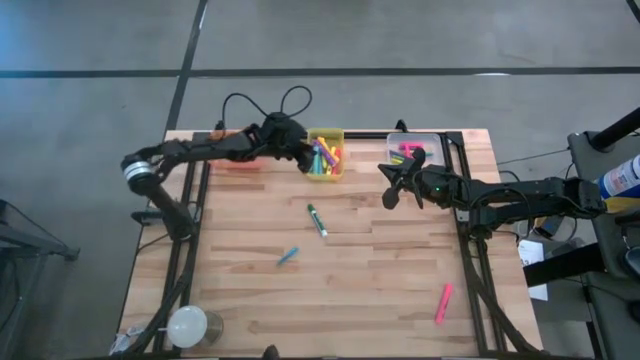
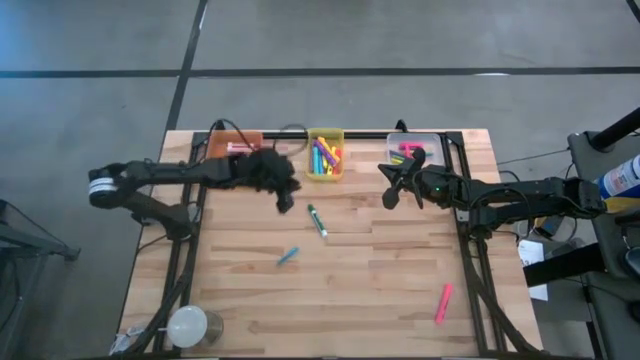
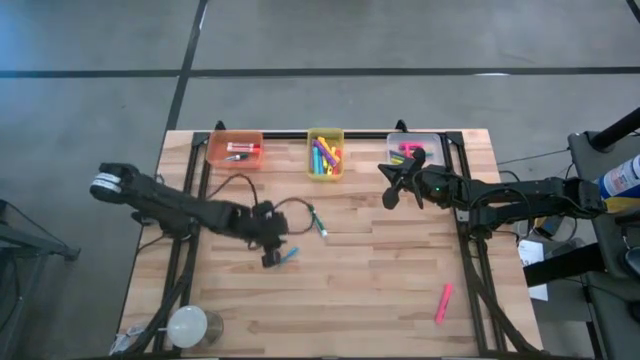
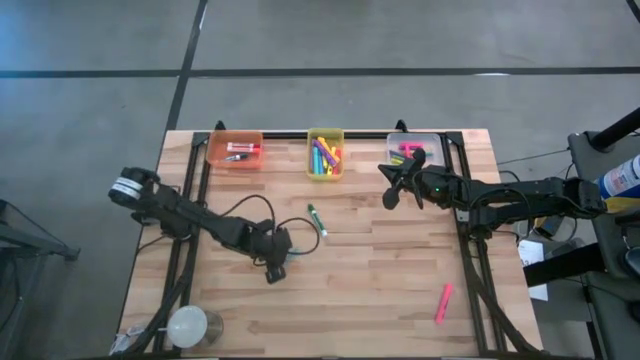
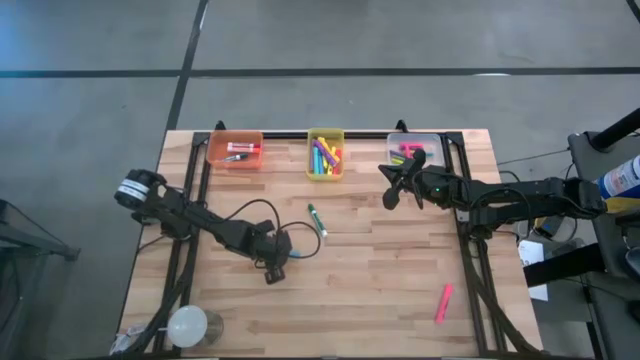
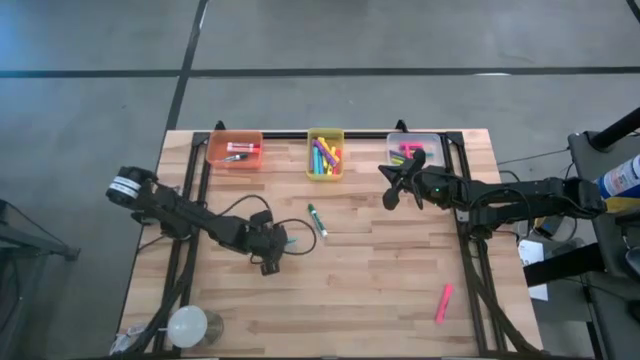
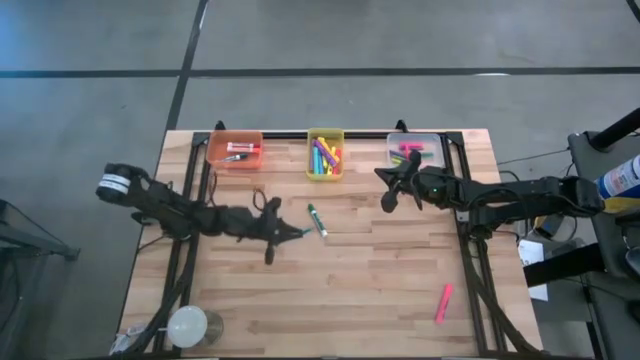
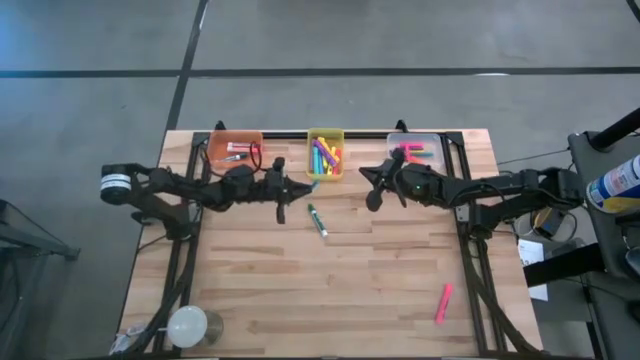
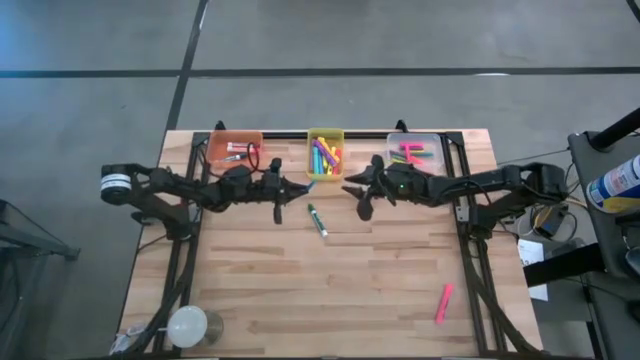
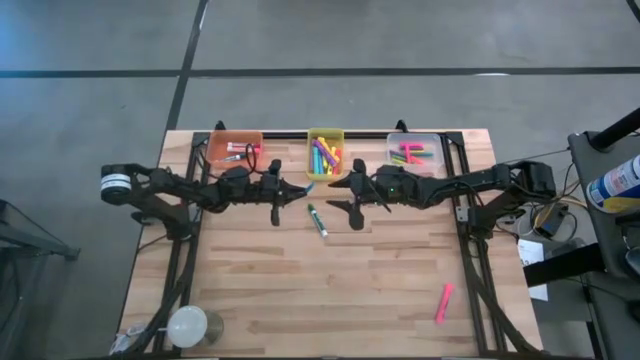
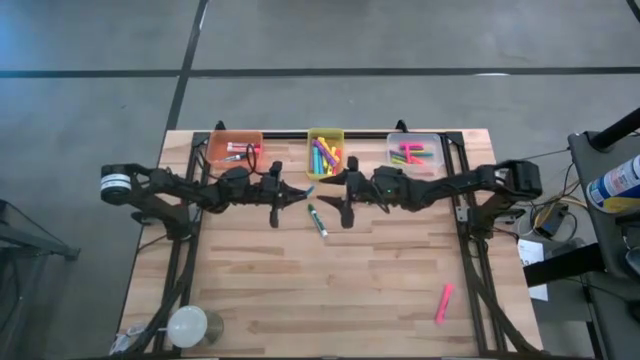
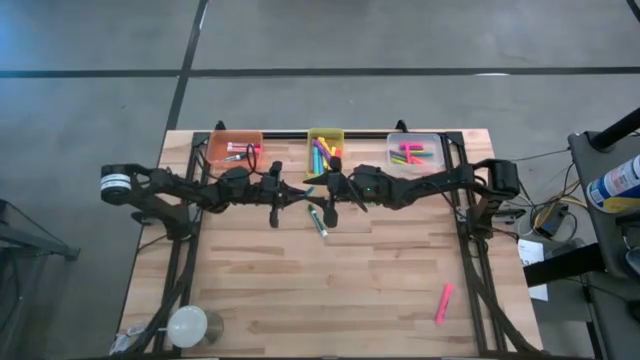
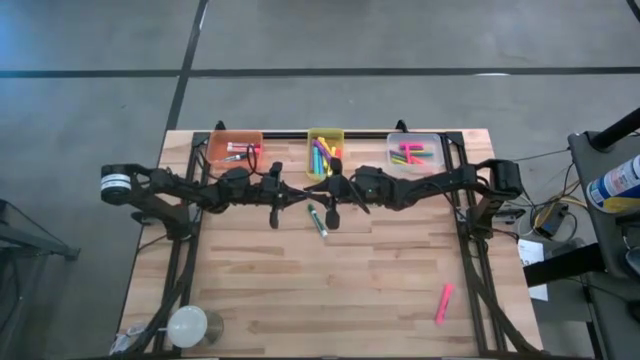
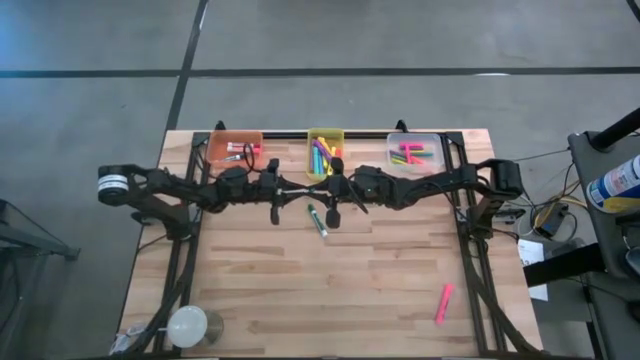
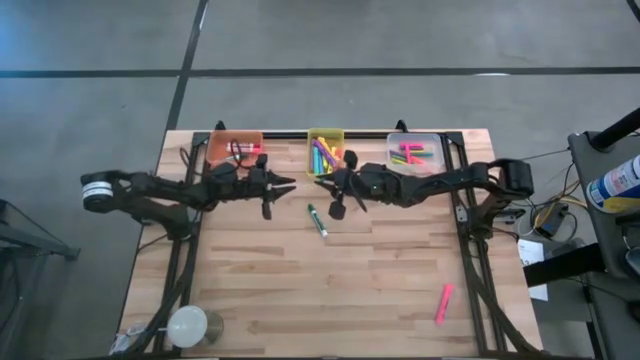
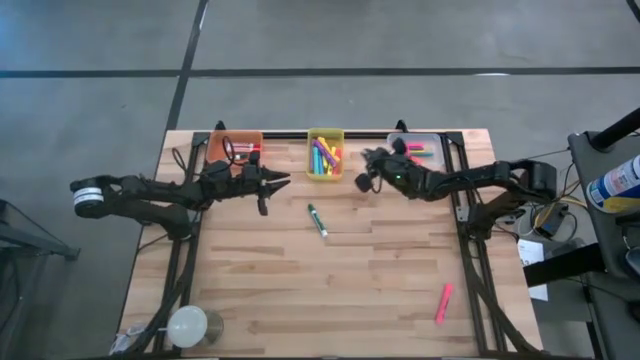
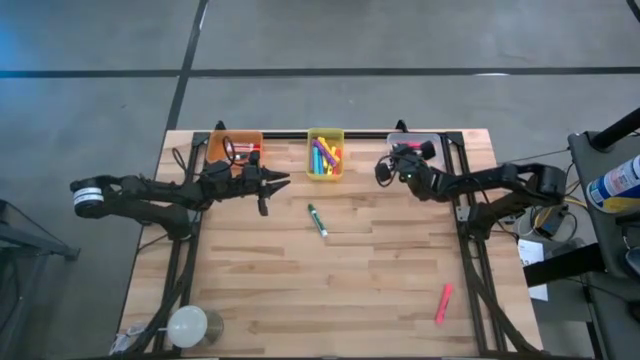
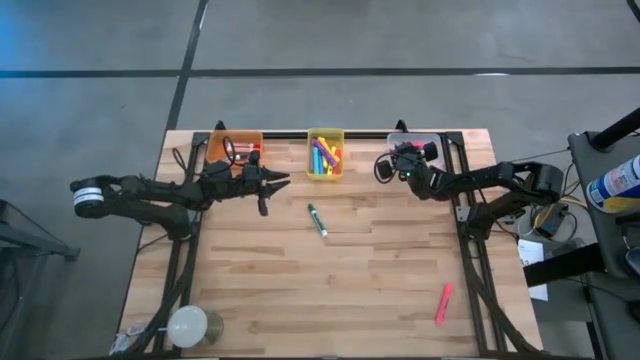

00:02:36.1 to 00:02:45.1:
Task: Pick & Place Markers
Put the blue pen into the transparent bin

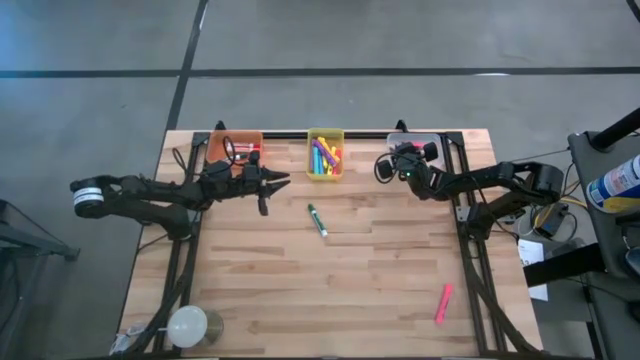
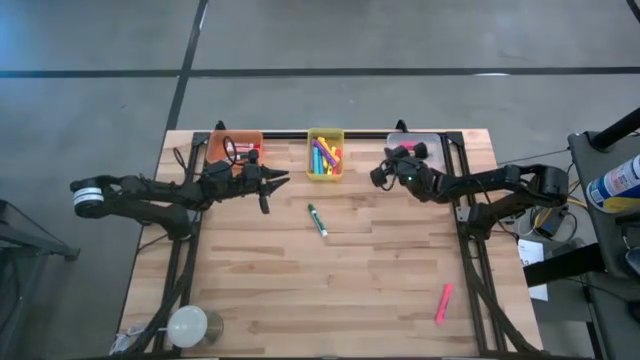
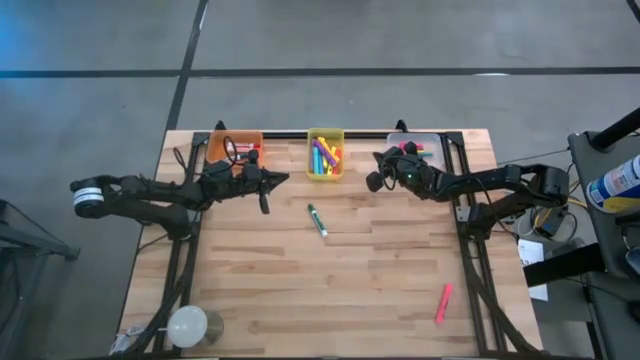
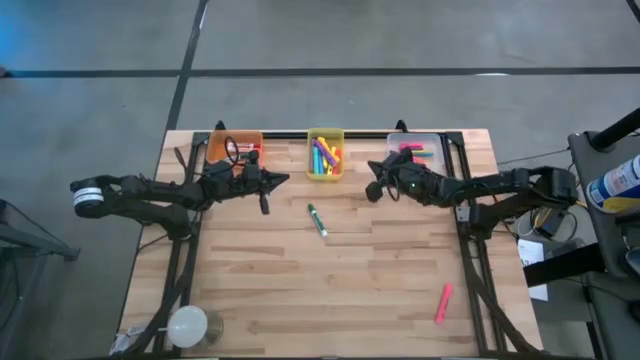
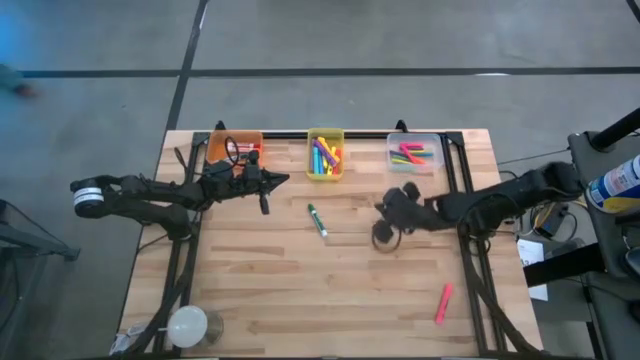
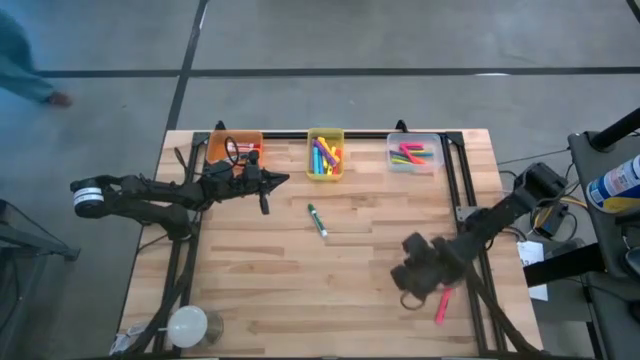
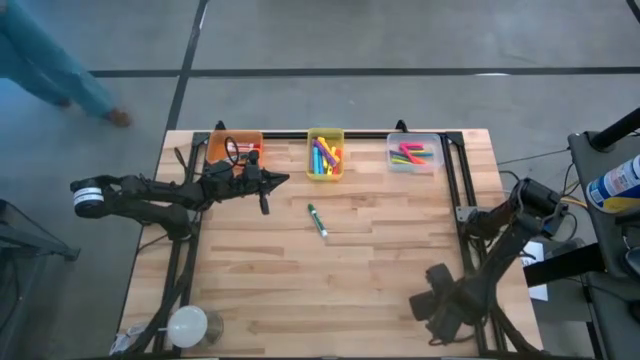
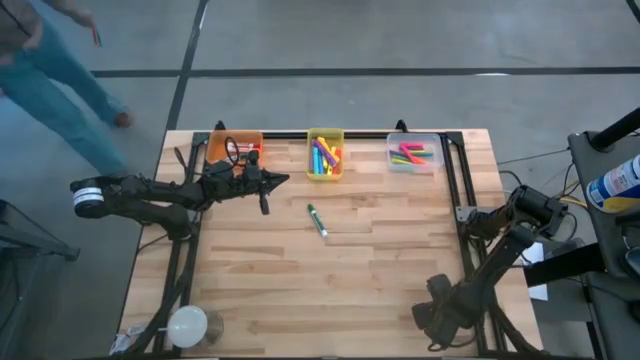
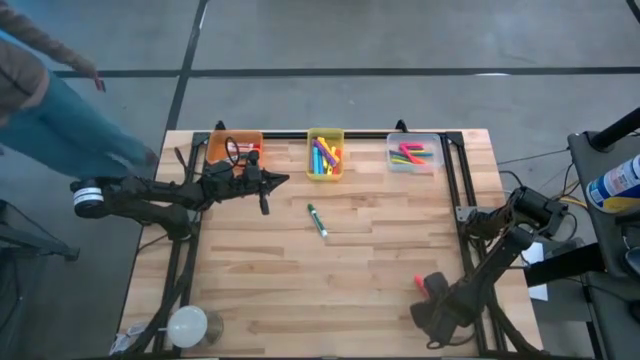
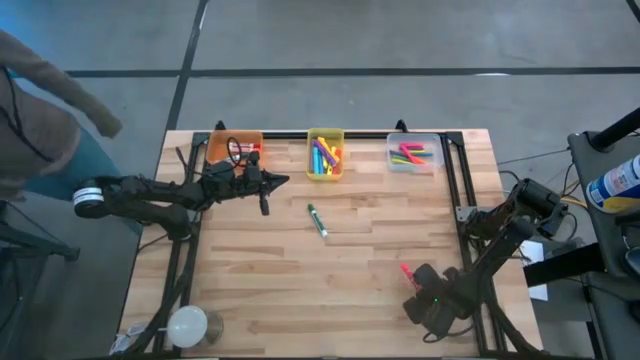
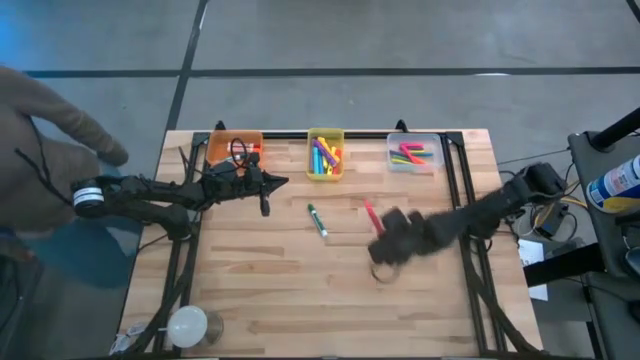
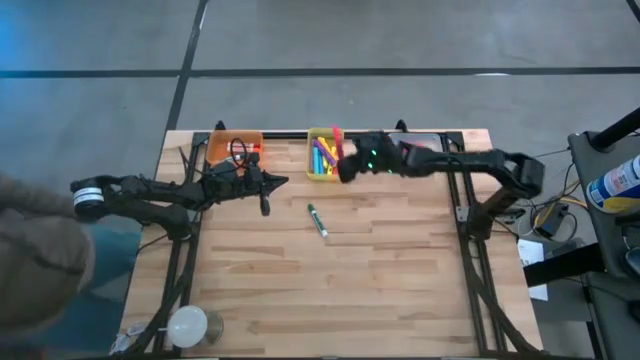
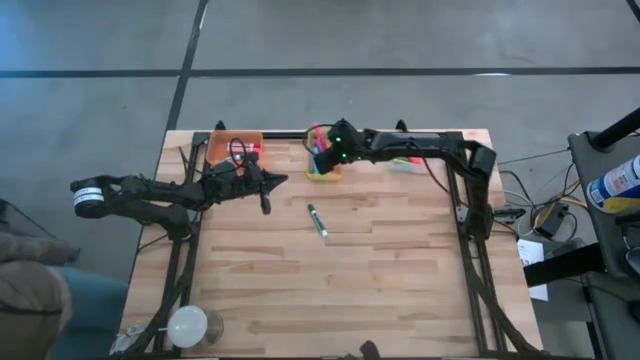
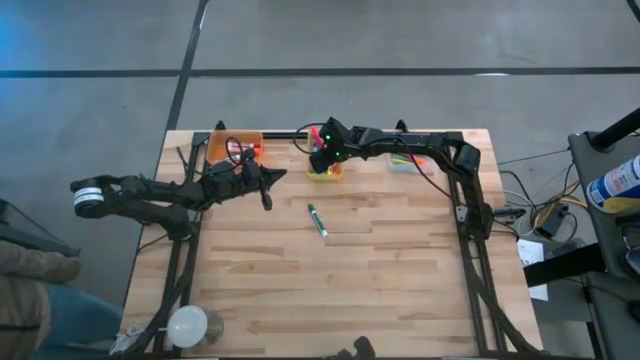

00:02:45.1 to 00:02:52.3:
Put the pink highlighter pen into the yellow bin
